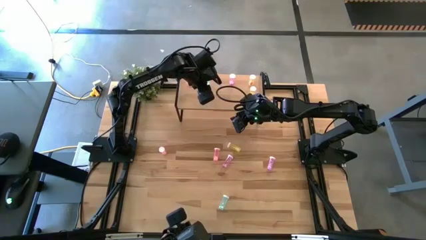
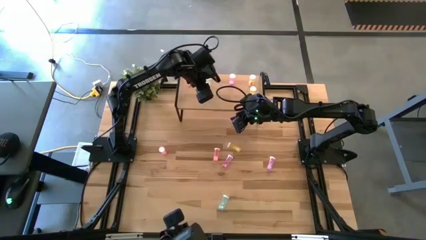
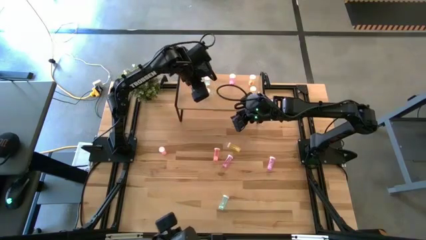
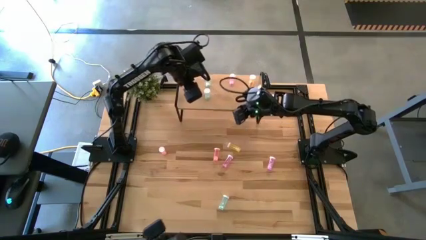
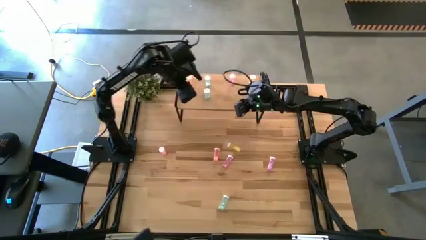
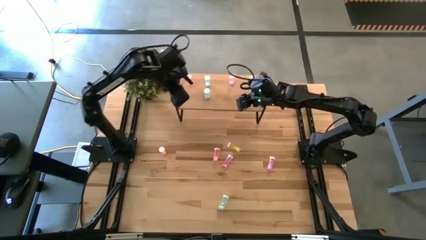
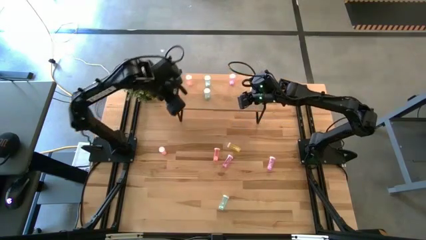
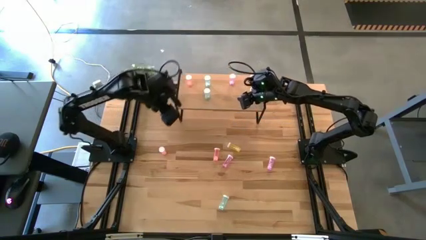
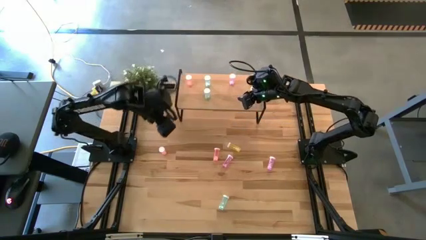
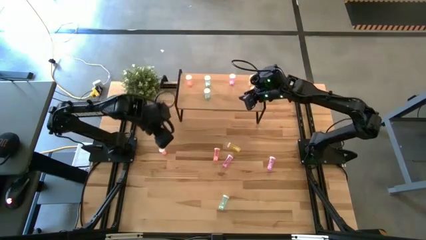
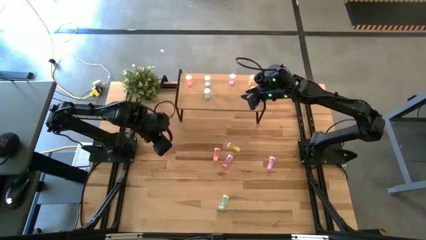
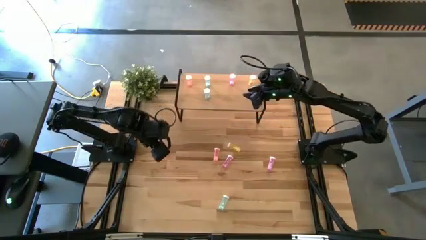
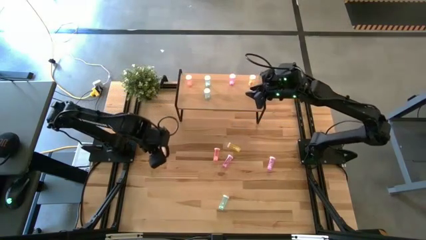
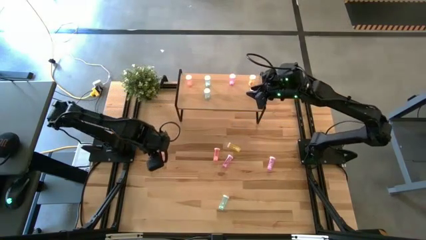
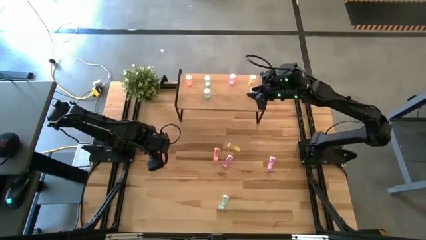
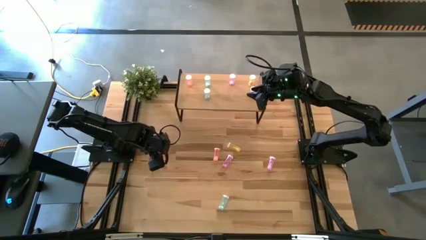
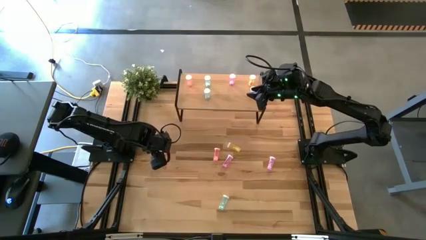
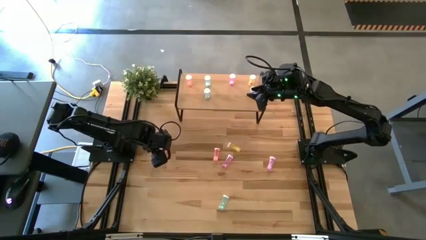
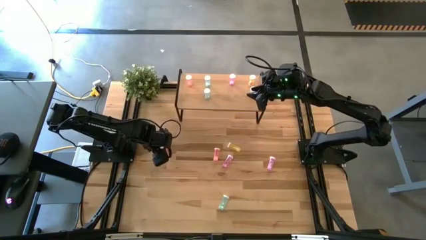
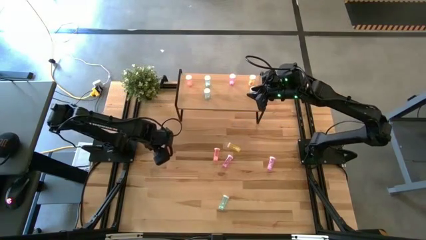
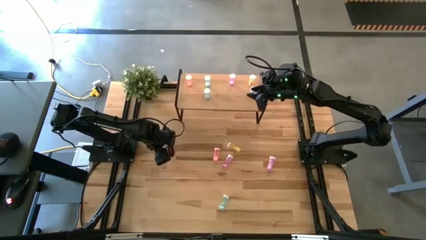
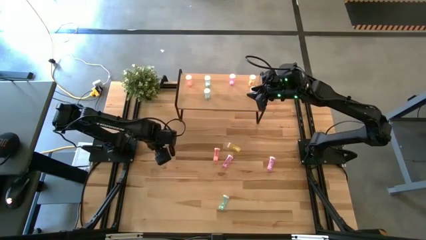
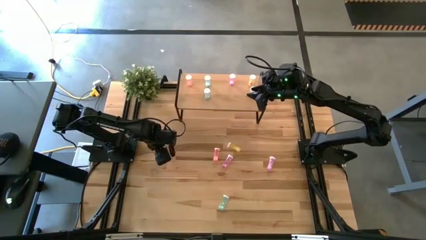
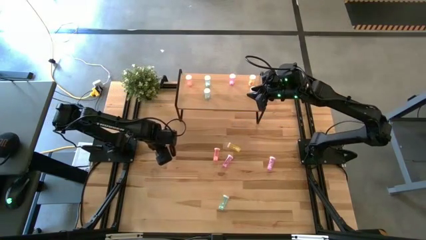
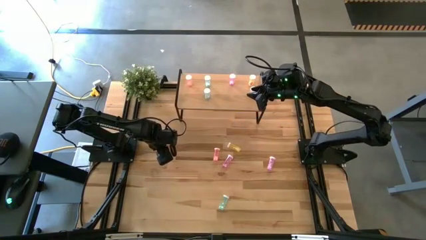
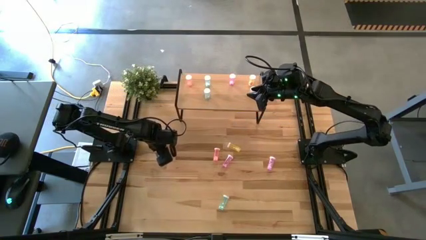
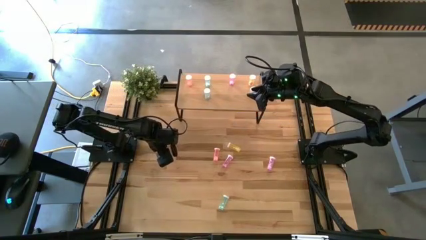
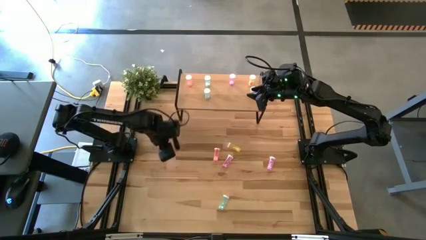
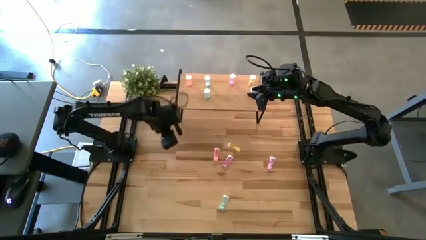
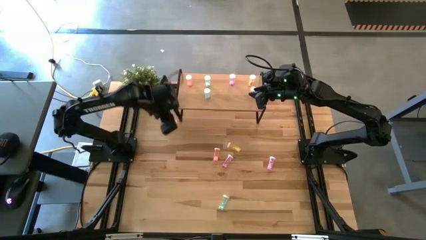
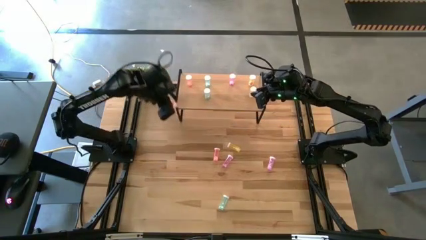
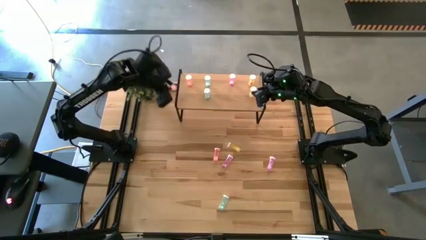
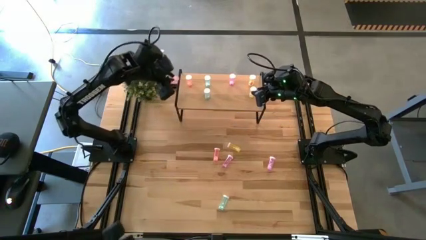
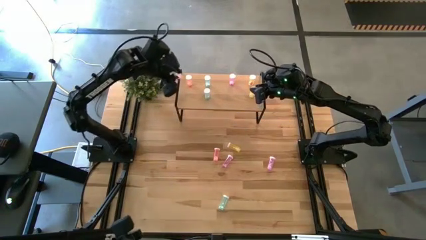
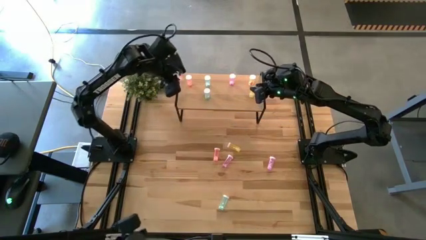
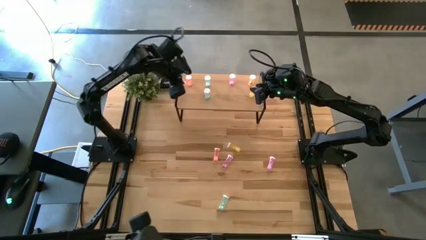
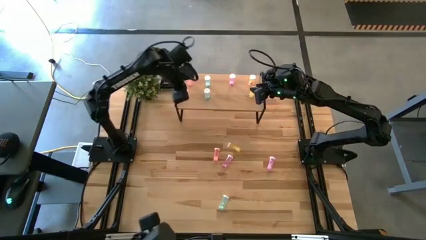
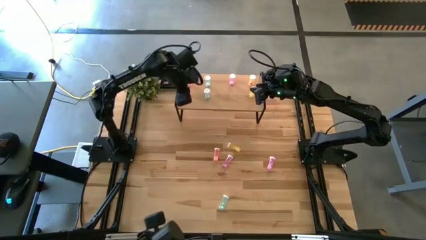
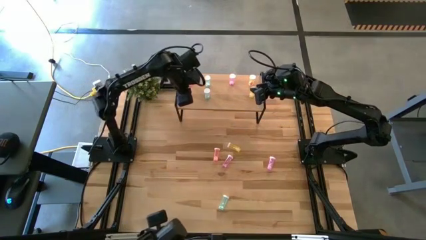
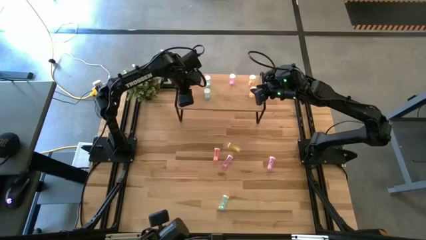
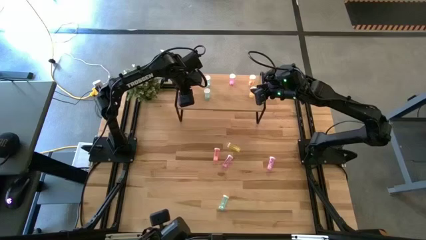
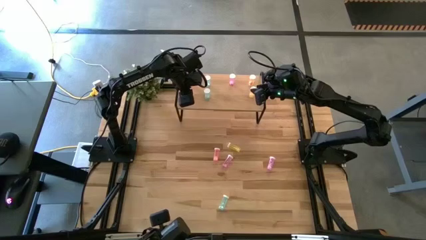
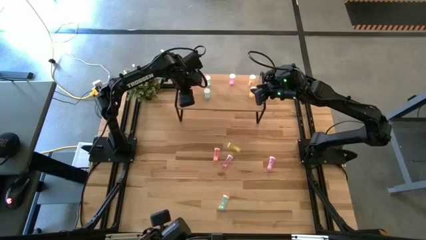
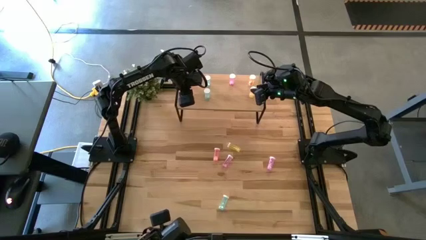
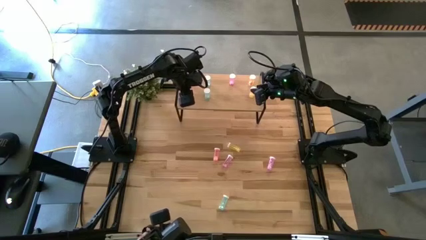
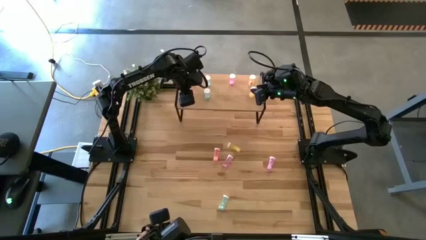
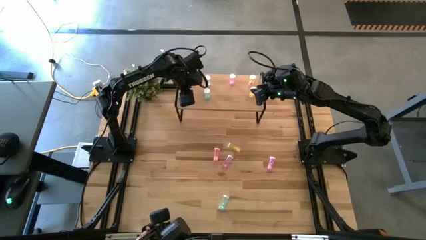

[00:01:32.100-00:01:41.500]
Task: Pick and place medicine bottles onto shelf by color
Put the top left pink pill bottle on the shelf aligned with the other pink pill bottle

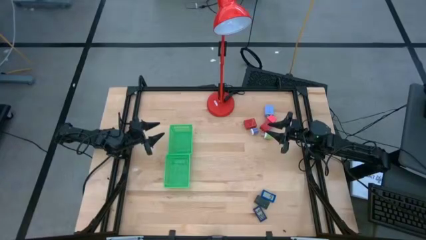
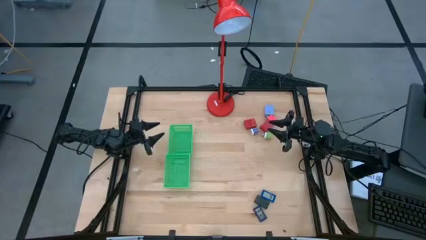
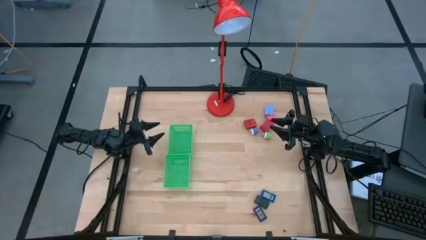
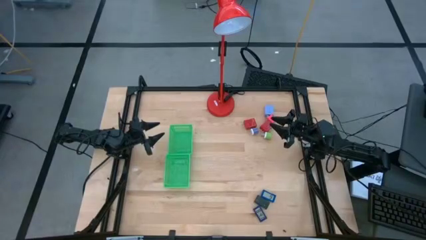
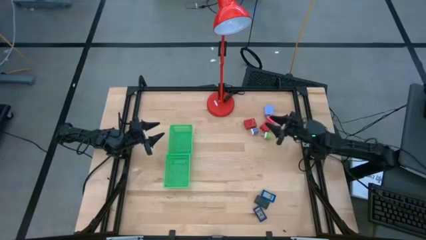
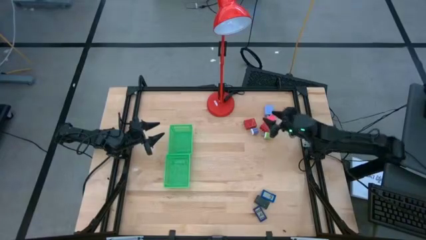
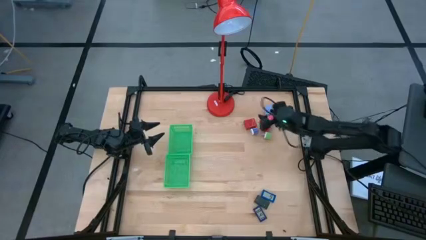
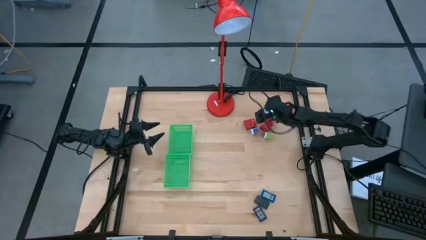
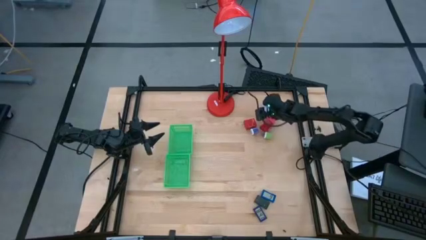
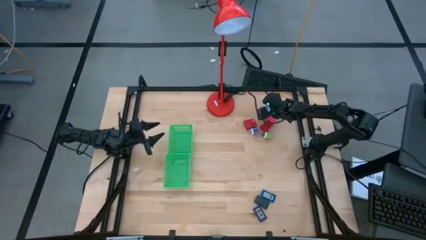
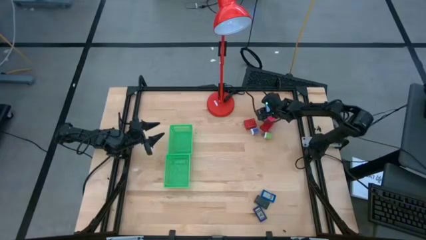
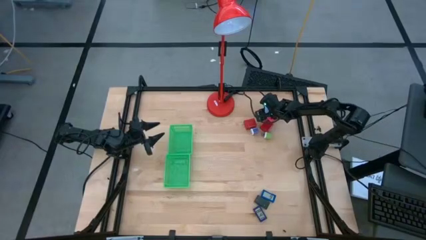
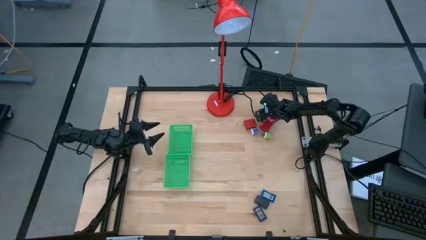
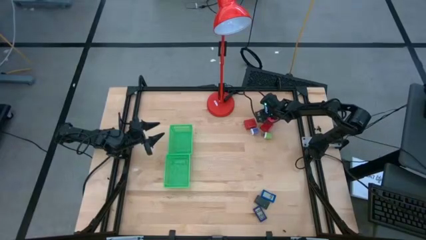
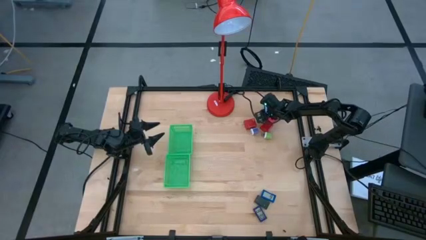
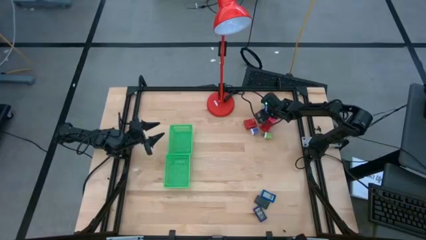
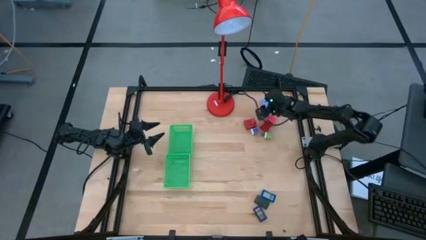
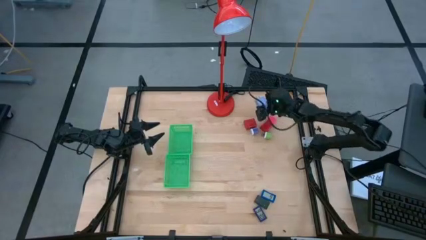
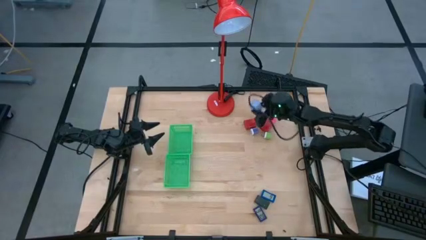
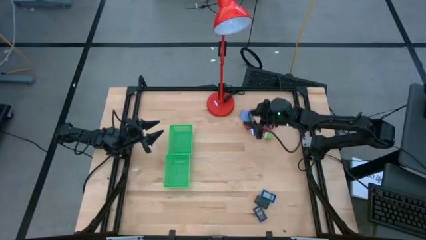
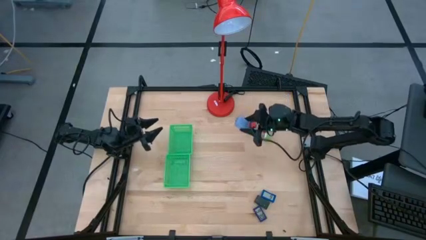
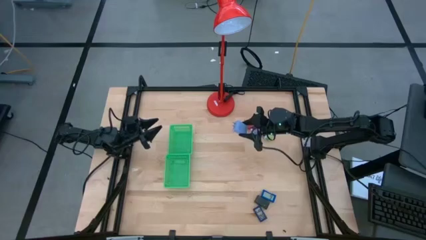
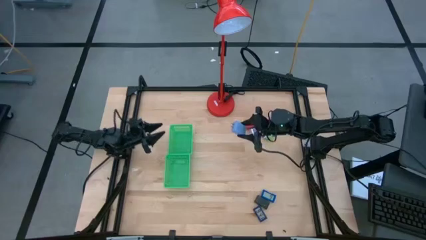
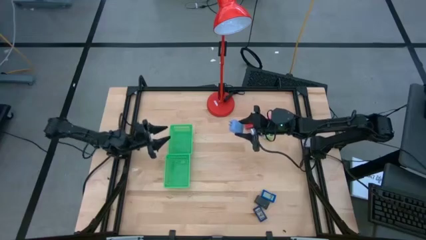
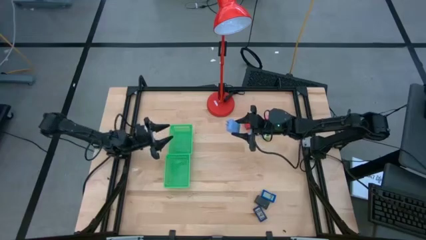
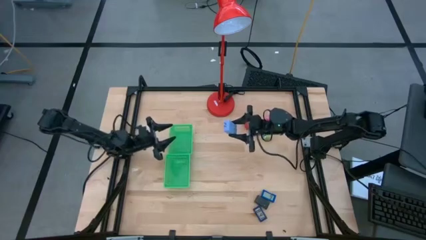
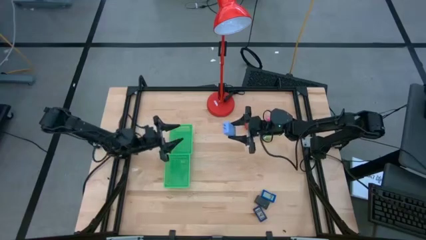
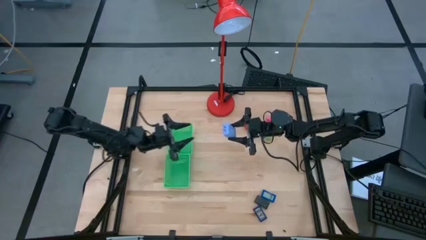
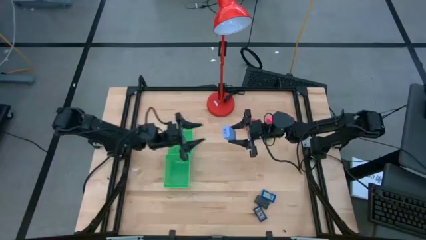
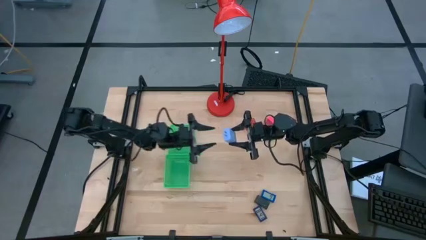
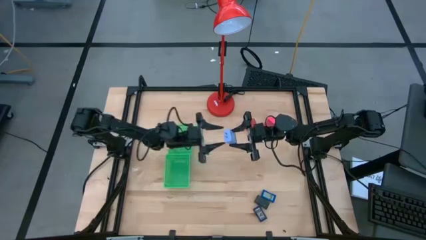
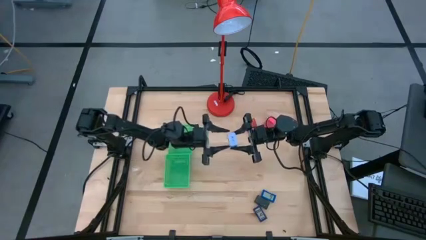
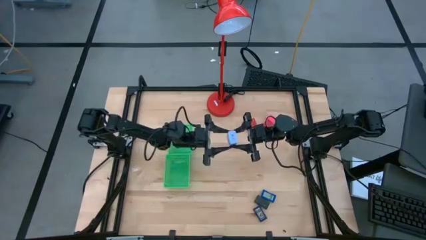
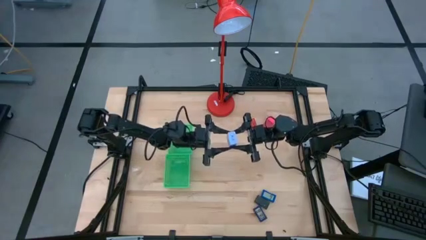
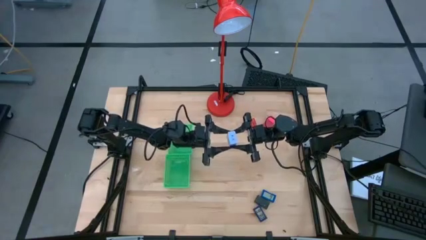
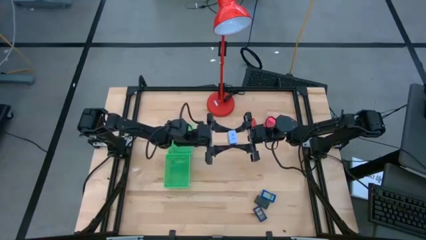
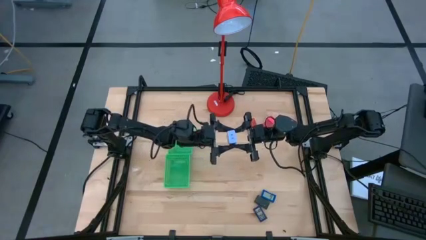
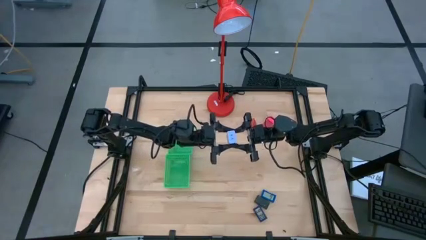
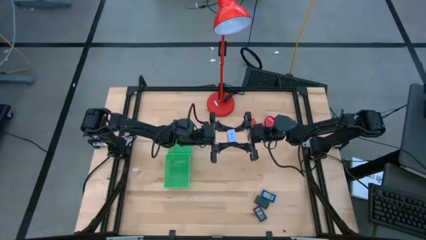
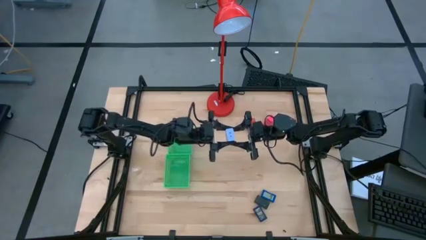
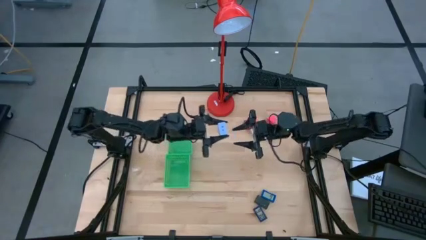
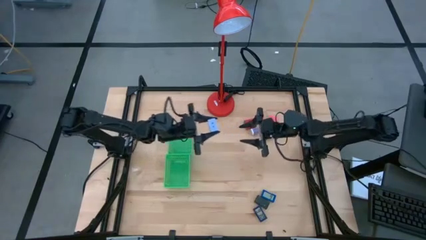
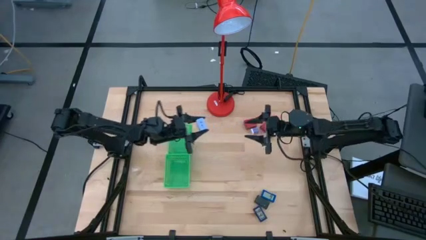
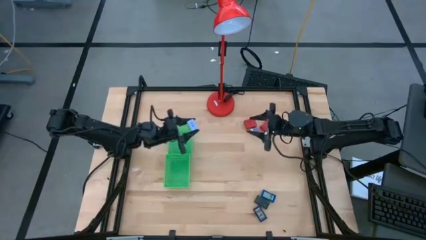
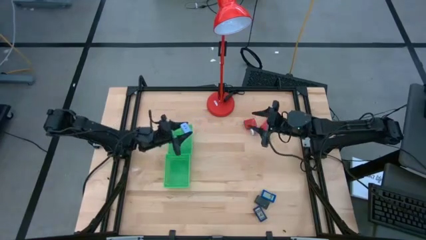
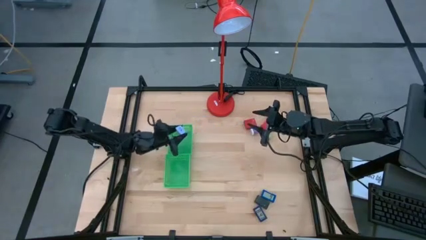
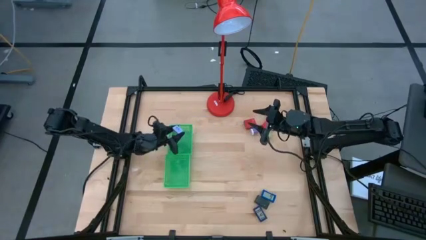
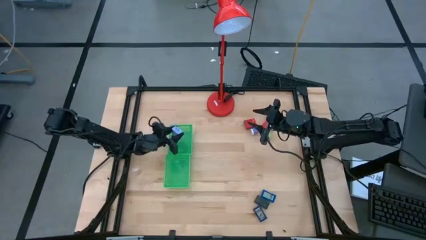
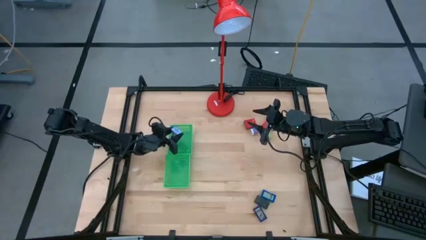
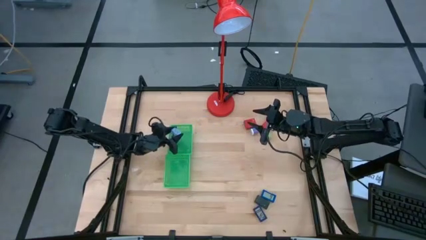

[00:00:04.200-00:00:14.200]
Task: Pick & Place Office items
Put the light blue charger adapter into the top green bin
